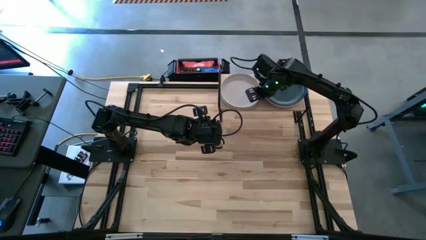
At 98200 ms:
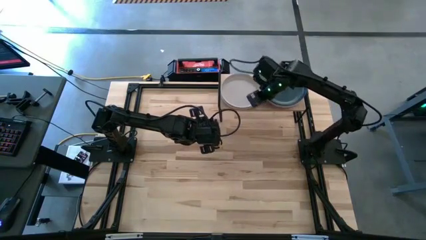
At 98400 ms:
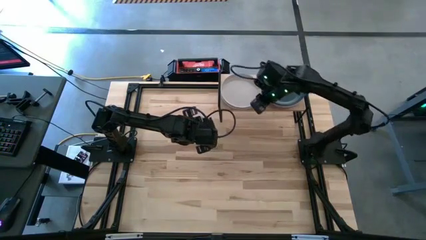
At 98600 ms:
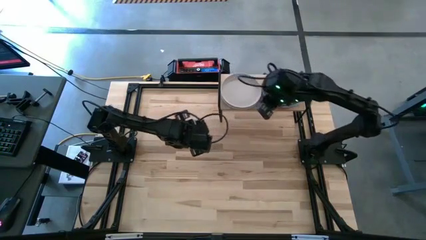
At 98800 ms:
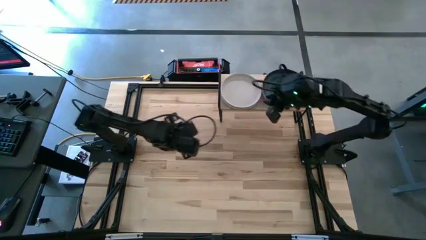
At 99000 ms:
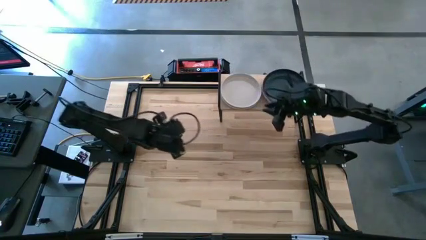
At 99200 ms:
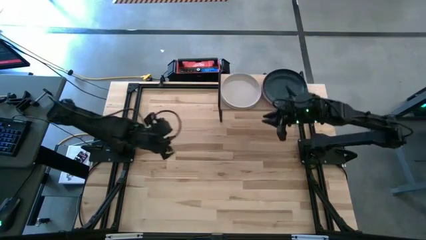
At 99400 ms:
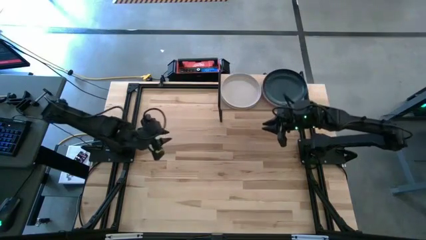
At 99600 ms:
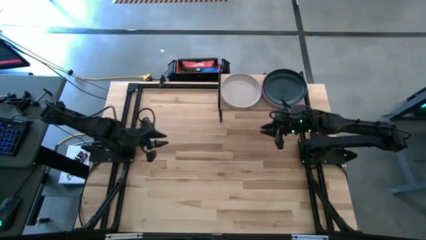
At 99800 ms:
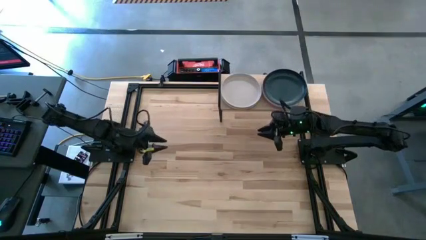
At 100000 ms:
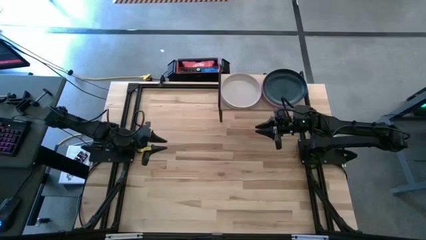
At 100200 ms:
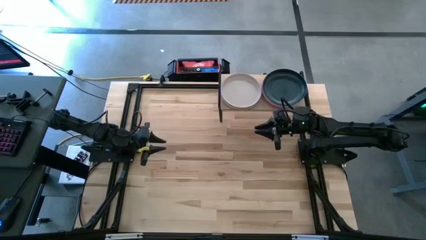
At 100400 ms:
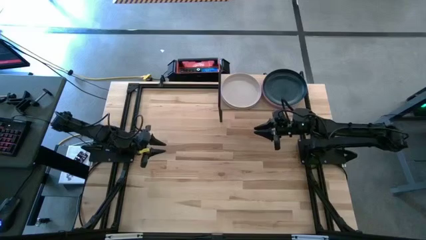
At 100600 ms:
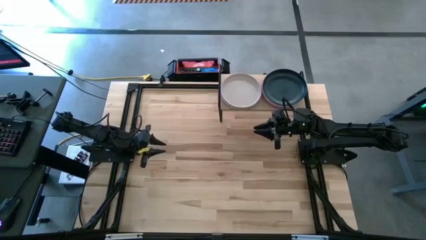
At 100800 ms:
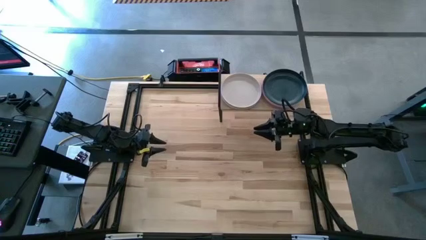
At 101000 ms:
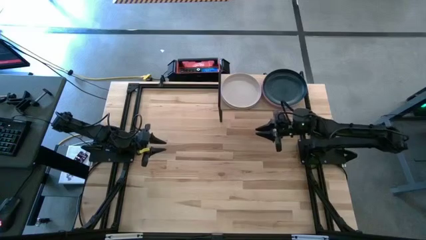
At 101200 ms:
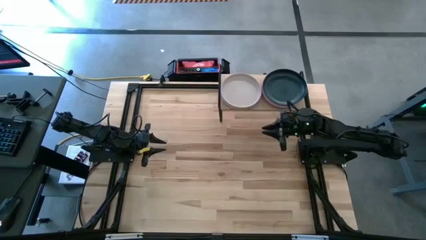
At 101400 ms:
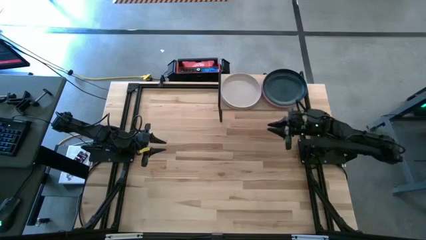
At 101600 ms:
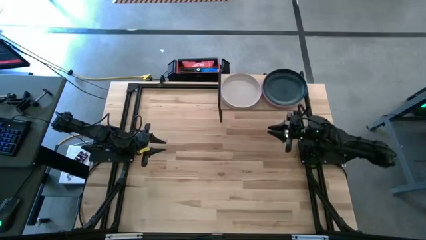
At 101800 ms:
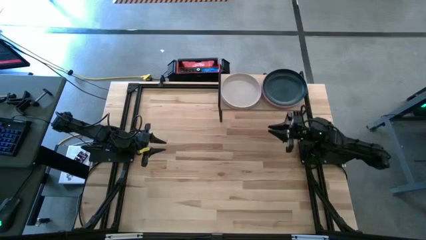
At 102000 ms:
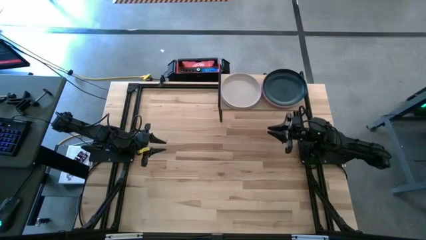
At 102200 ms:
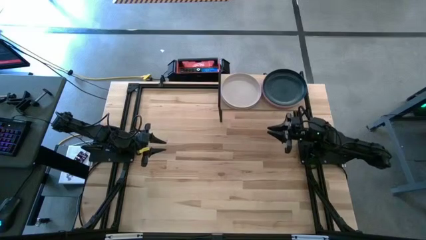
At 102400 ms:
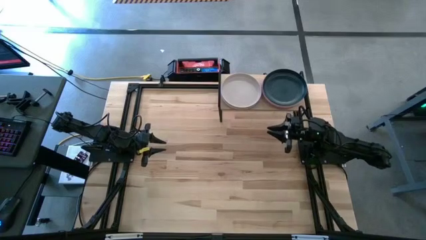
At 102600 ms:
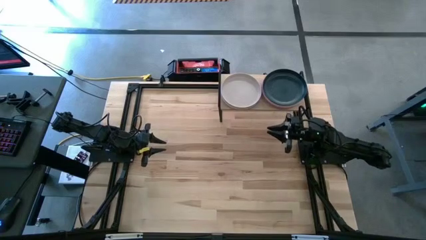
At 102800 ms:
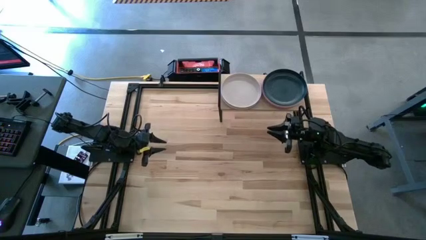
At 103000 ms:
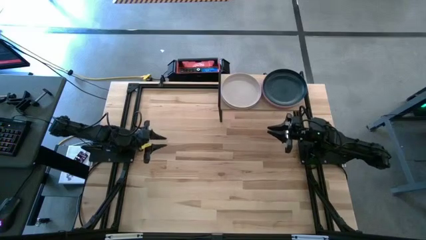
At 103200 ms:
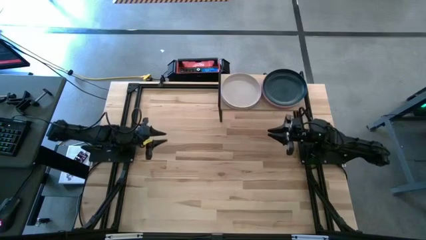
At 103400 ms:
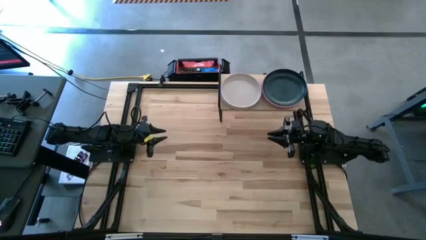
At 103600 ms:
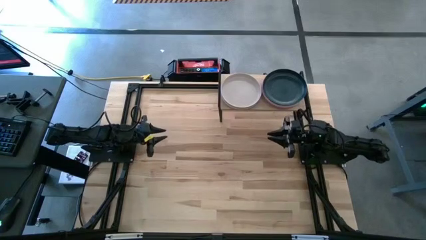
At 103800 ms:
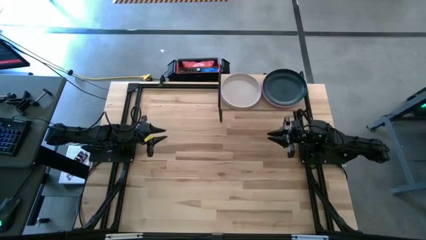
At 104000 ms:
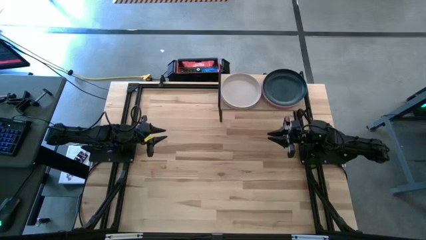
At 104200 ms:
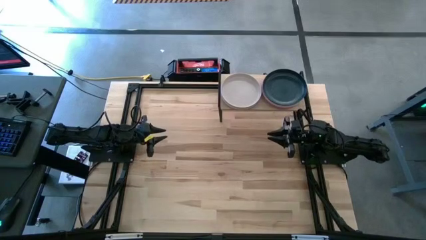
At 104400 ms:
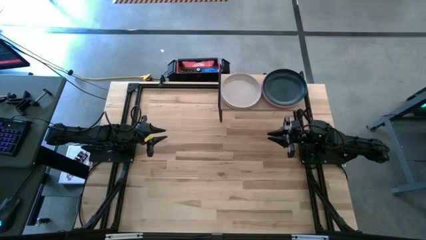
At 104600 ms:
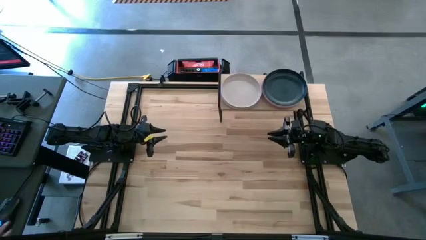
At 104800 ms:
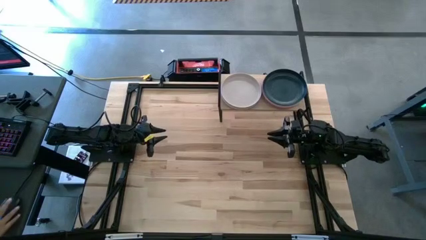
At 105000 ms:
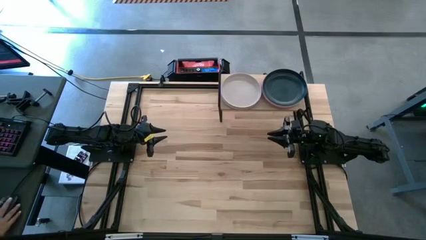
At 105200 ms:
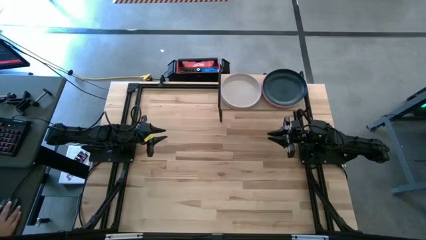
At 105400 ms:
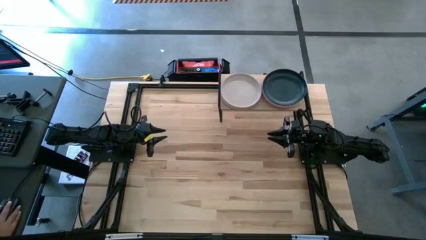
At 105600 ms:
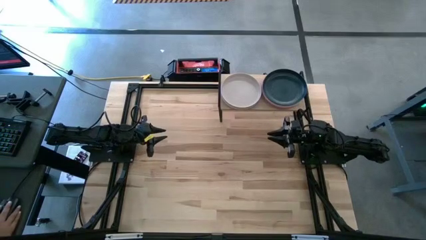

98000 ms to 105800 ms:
Task: Place and stack plates onto a shelf
Return to Home Position

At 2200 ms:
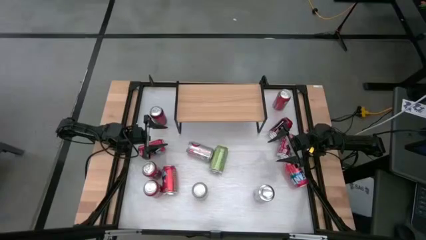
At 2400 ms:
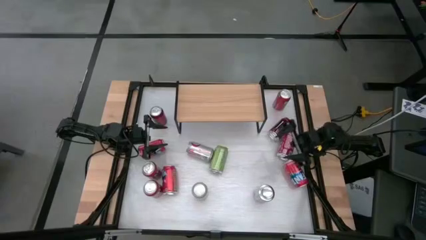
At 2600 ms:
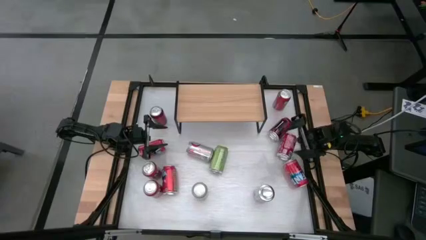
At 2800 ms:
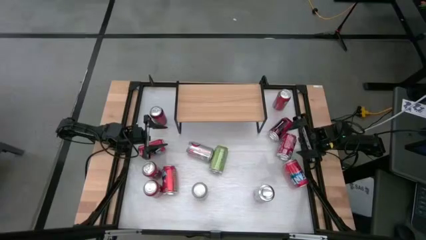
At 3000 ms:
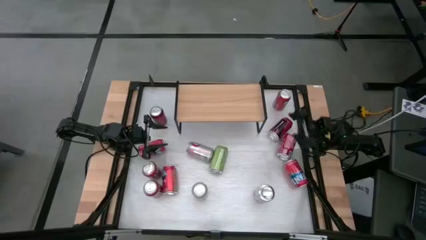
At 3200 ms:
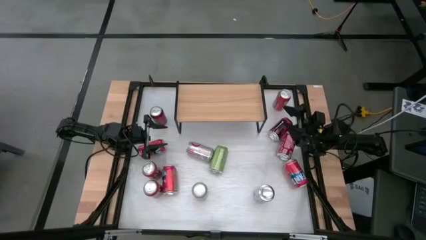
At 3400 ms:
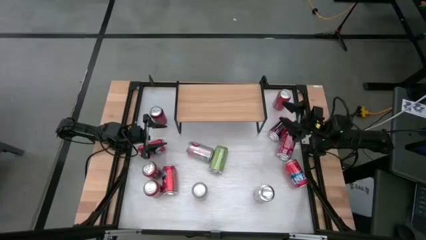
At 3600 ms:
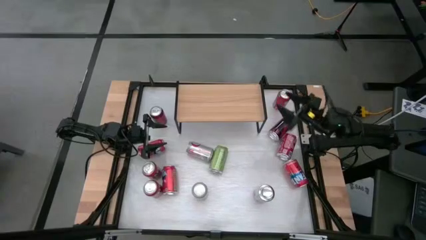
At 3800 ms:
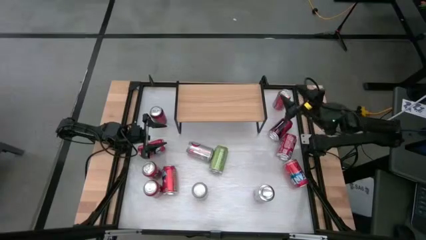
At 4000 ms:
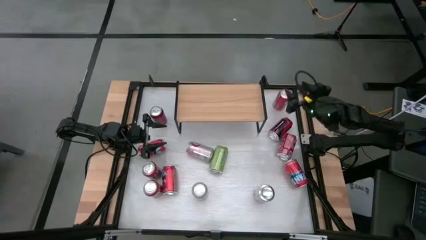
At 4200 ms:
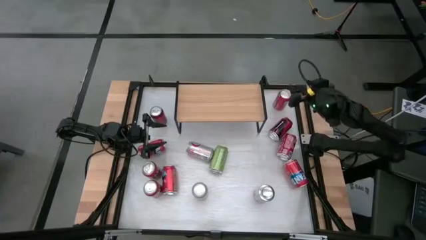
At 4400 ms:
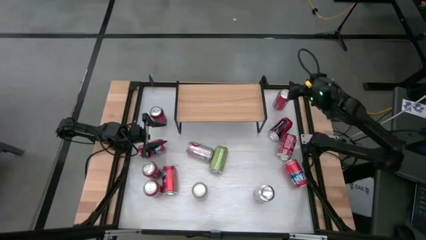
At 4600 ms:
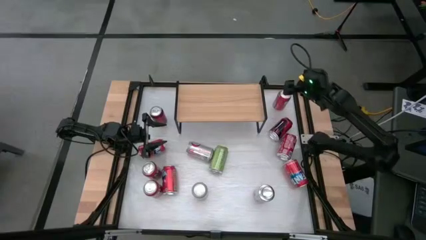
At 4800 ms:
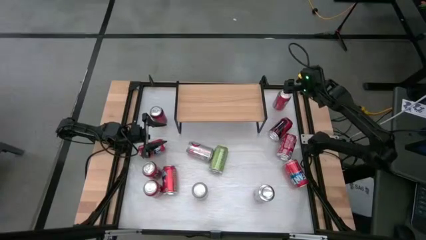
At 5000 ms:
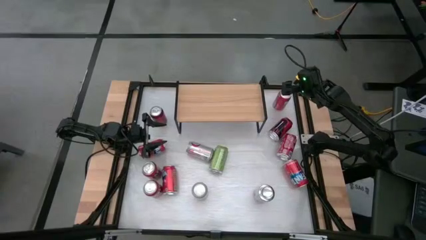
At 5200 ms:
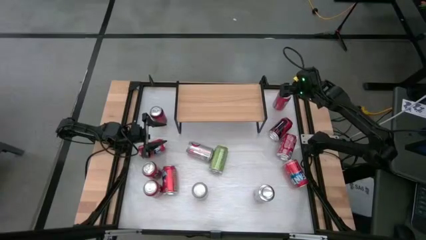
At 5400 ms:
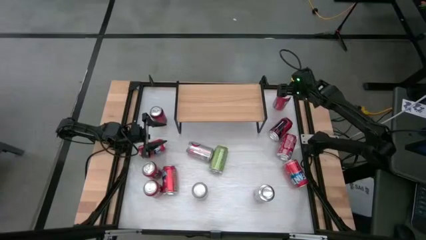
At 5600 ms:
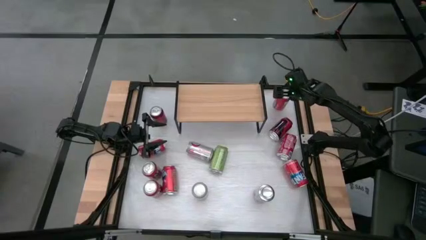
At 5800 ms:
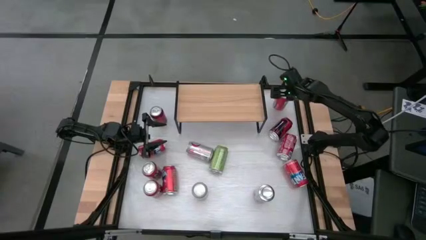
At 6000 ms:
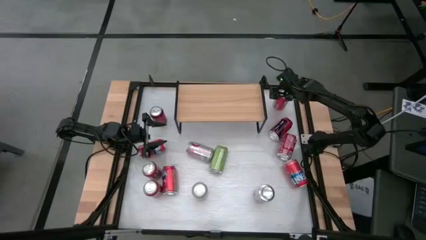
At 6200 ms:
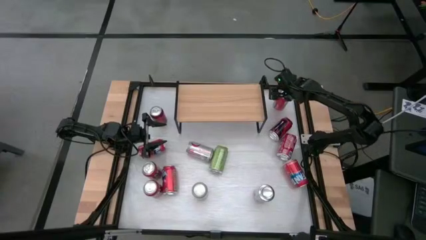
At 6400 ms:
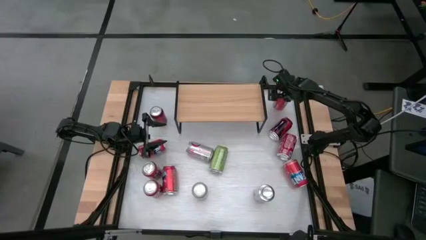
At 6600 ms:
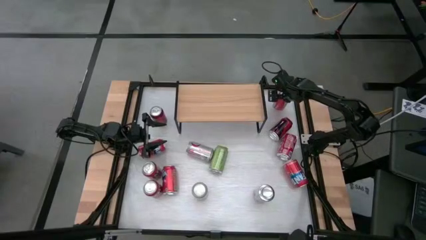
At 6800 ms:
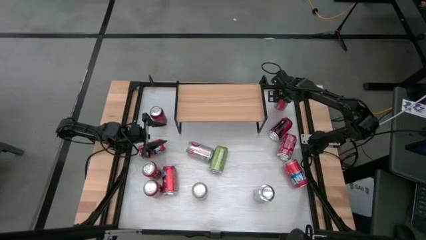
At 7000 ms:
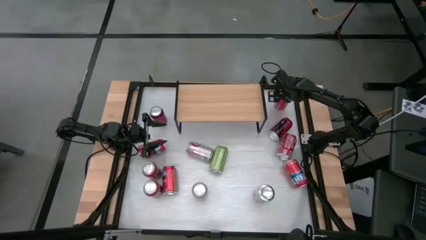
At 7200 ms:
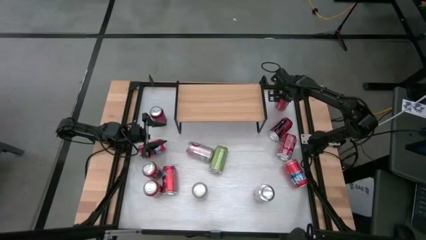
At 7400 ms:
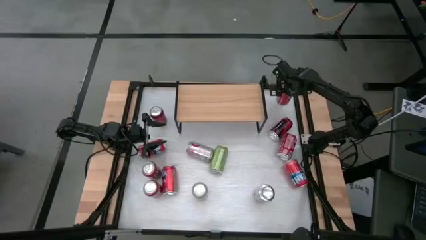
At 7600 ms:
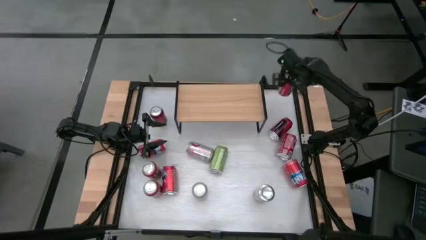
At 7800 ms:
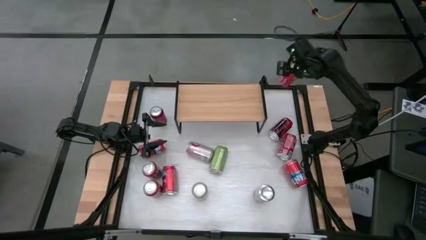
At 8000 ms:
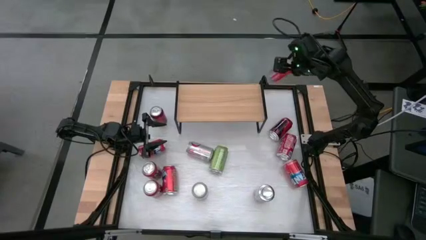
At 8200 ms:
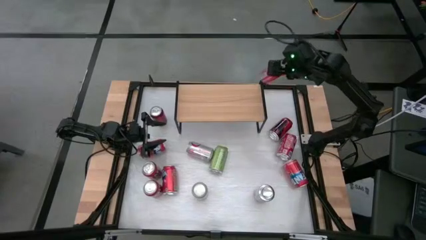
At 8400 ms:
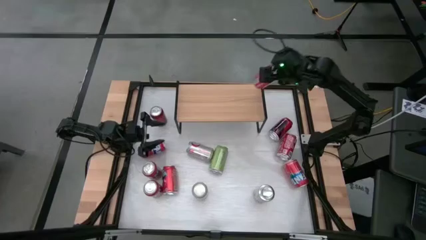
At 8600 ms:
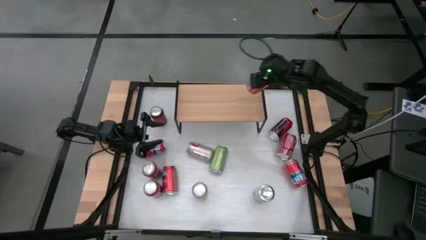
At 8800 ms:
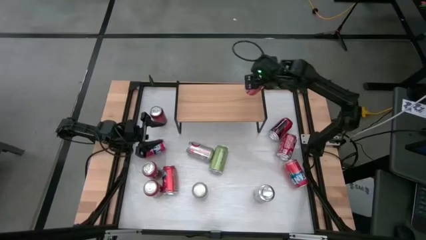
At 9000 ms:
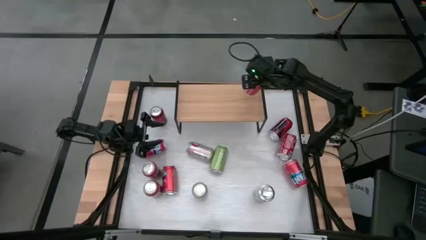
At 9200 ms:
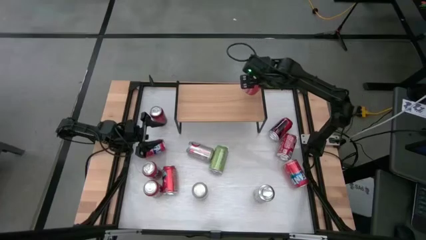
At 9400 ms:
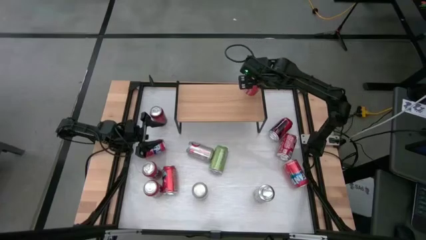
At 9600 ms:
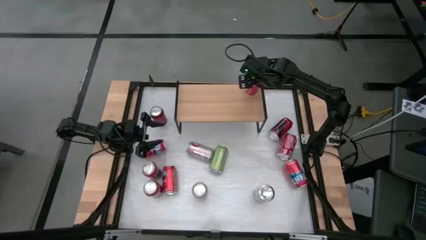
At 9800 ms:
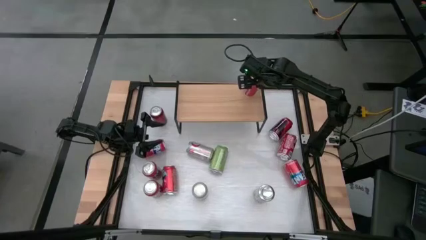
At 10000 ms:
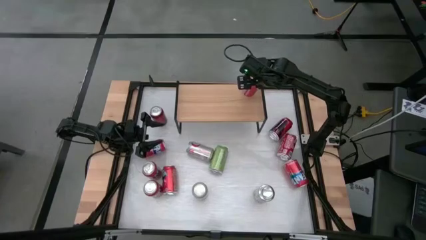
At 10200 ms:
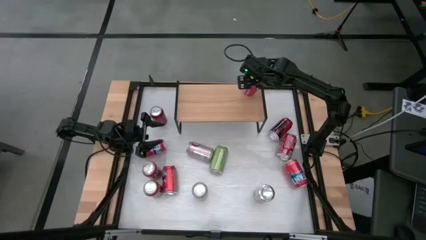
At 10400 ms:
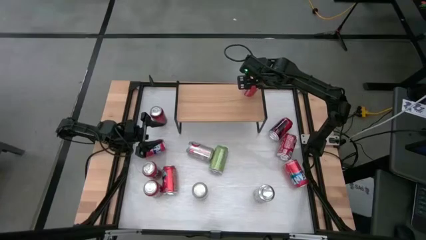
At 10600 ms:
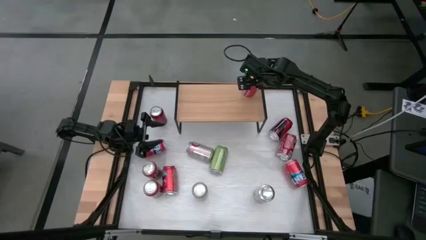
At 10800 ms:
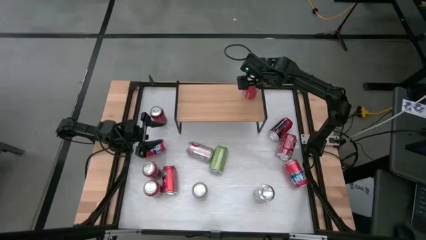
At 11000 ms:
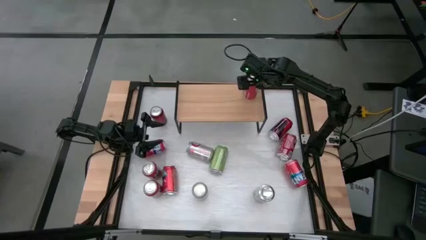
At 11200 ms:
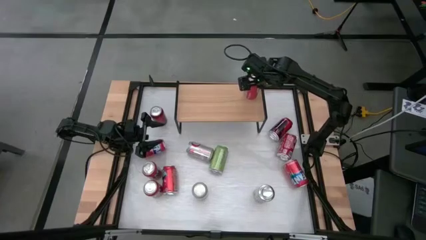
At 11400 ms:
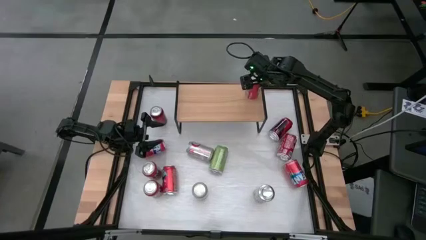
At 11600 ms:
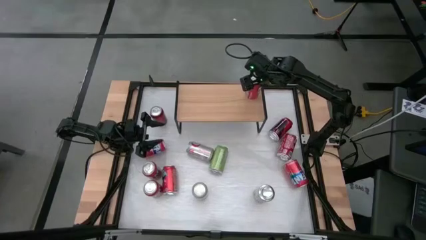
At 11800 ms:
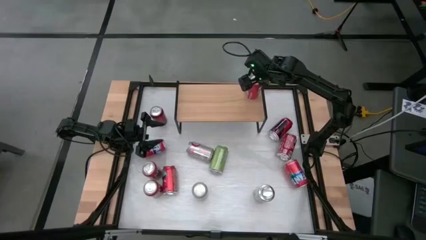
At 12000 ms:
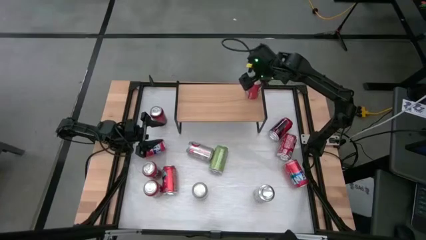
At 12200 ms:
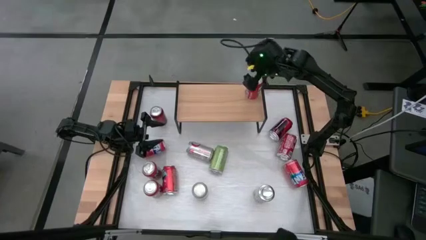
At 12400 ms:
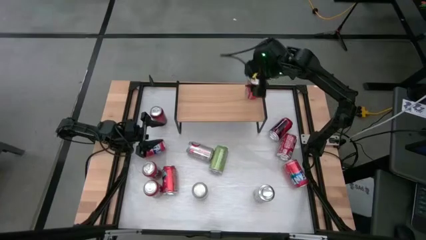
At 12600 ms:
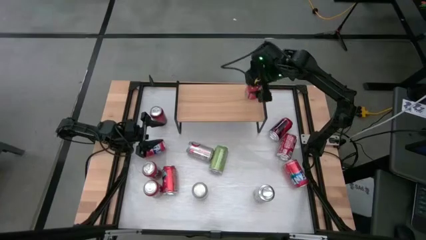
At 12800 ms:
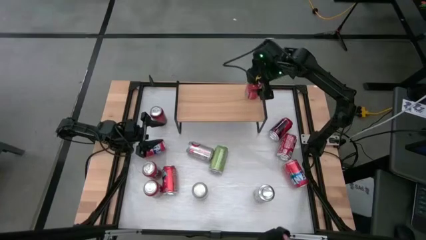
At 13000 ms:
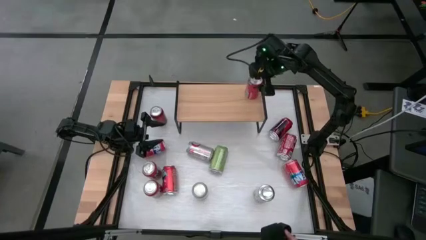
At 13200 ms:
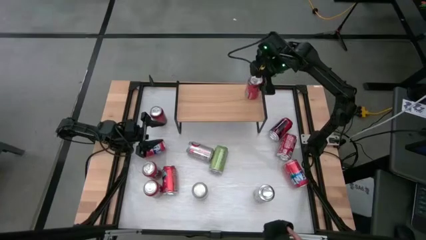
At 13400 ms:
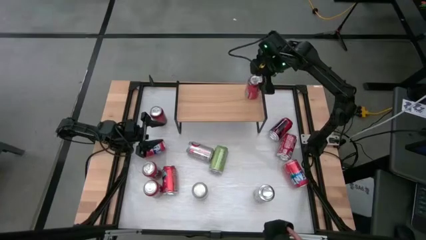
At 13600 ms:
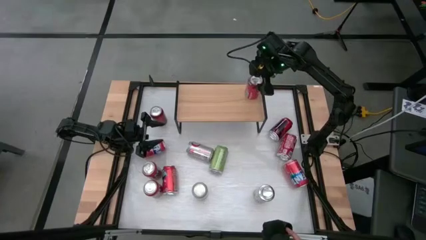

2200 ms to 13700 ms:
Task: Place canned beverage on shelf
Put the orange soda can on the shelf
